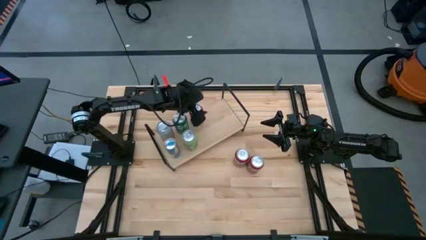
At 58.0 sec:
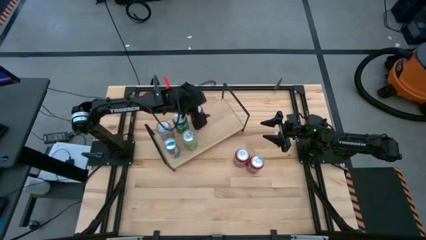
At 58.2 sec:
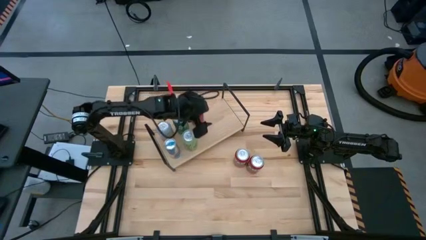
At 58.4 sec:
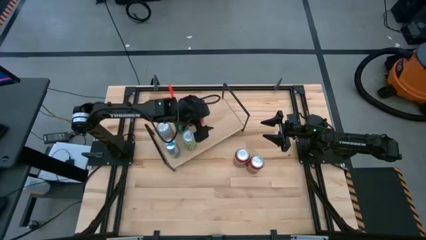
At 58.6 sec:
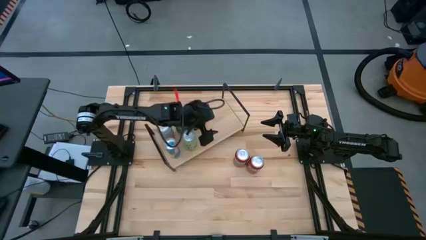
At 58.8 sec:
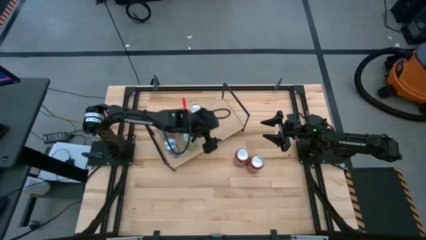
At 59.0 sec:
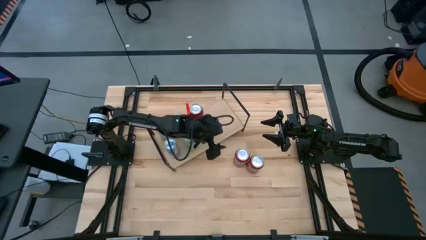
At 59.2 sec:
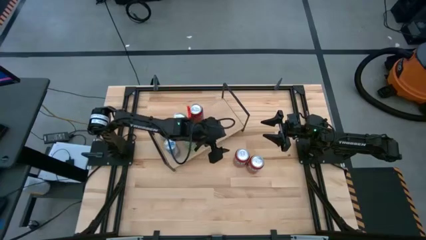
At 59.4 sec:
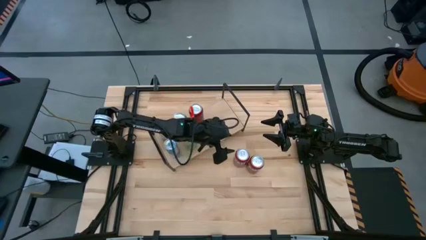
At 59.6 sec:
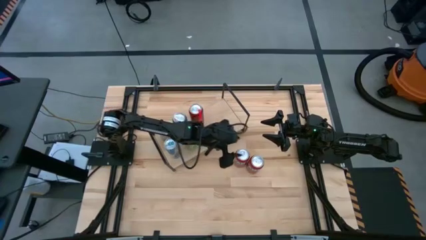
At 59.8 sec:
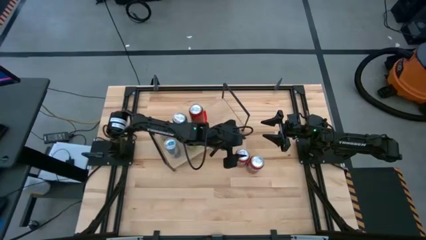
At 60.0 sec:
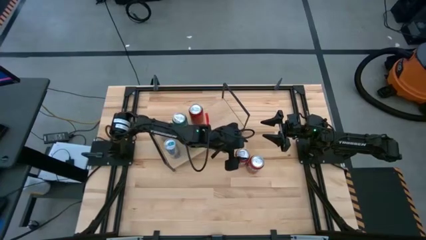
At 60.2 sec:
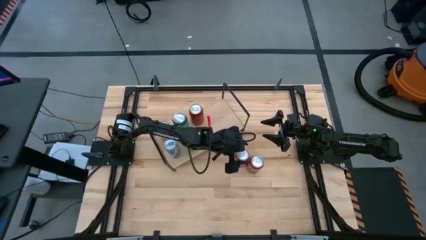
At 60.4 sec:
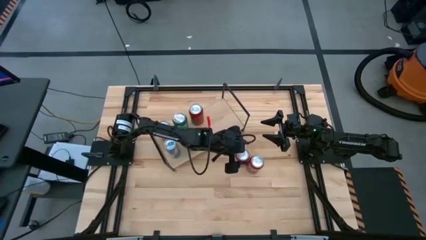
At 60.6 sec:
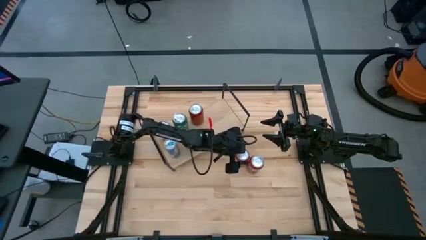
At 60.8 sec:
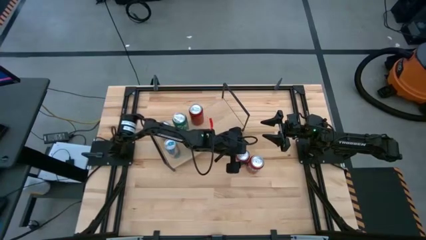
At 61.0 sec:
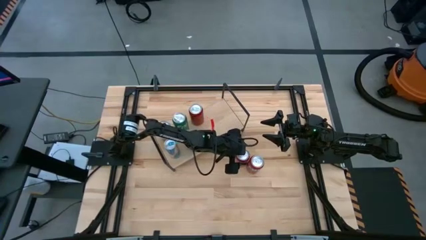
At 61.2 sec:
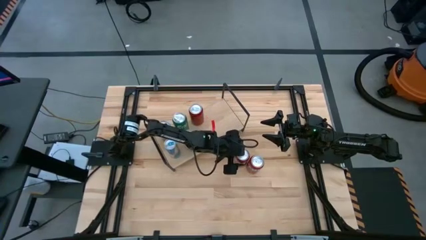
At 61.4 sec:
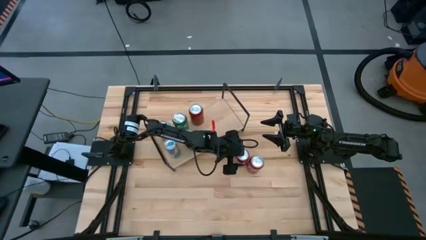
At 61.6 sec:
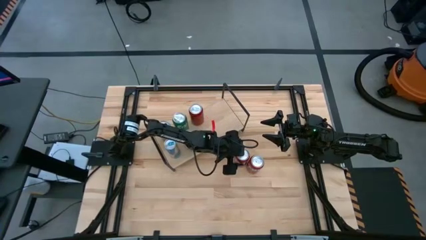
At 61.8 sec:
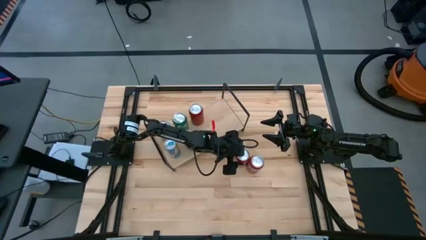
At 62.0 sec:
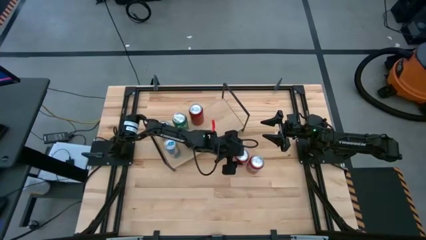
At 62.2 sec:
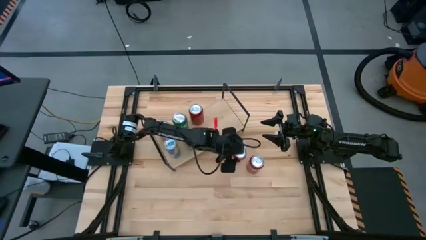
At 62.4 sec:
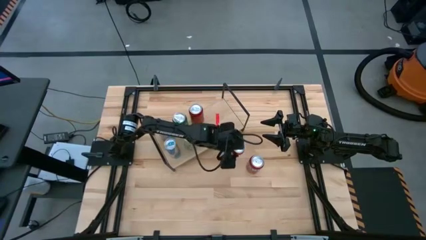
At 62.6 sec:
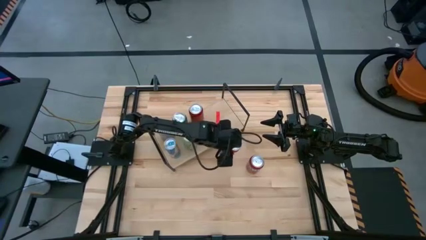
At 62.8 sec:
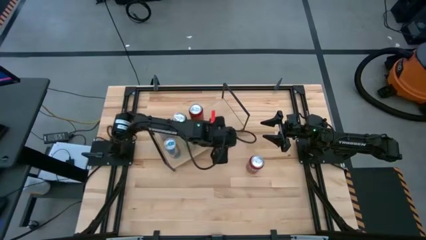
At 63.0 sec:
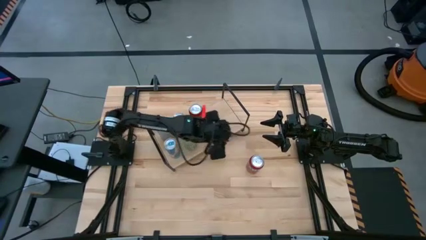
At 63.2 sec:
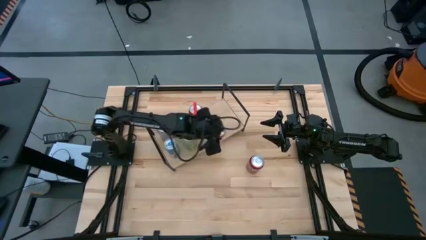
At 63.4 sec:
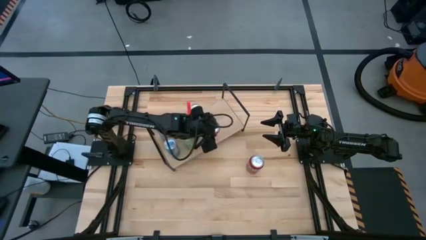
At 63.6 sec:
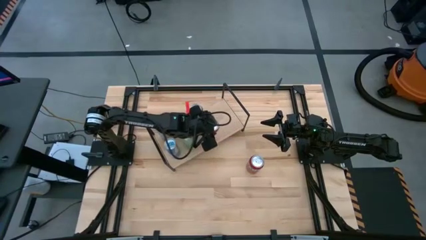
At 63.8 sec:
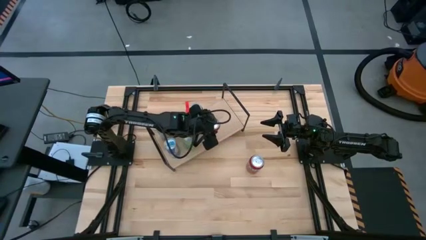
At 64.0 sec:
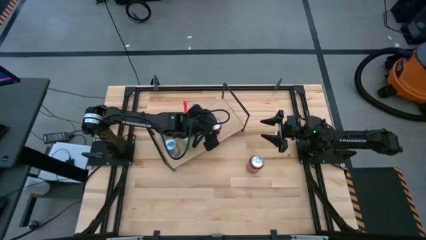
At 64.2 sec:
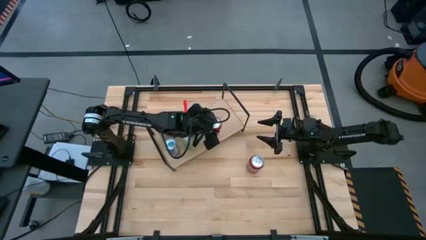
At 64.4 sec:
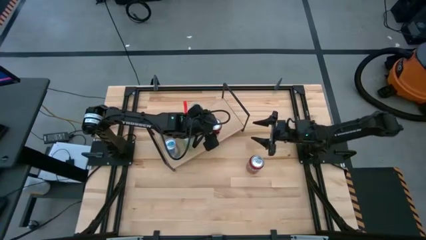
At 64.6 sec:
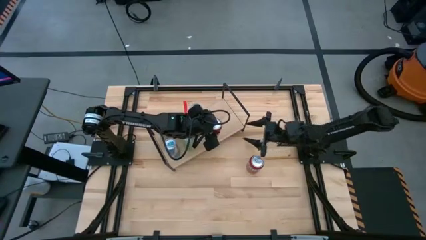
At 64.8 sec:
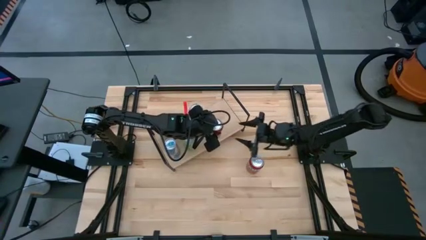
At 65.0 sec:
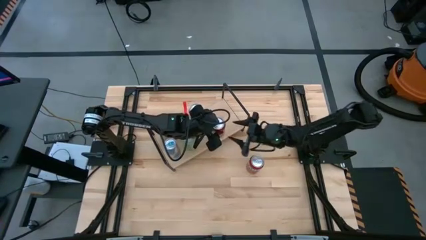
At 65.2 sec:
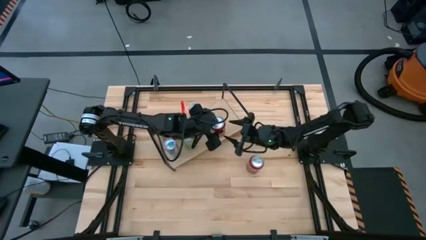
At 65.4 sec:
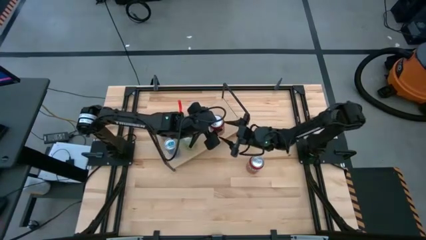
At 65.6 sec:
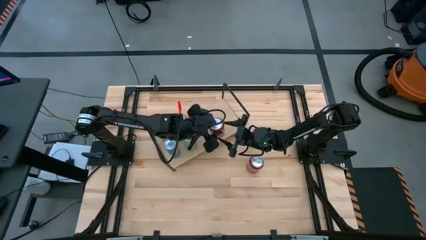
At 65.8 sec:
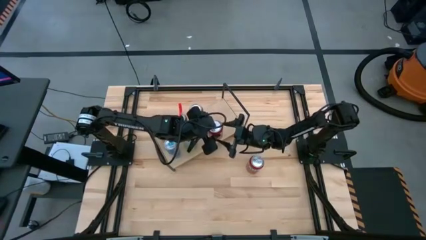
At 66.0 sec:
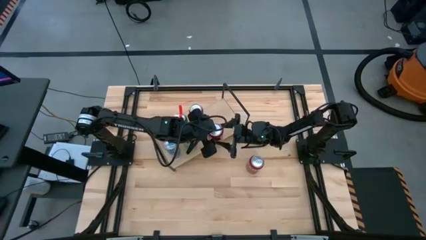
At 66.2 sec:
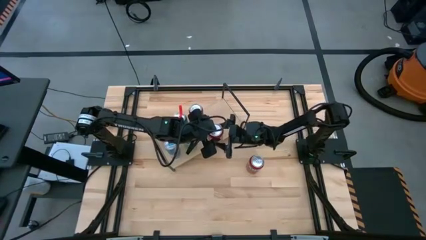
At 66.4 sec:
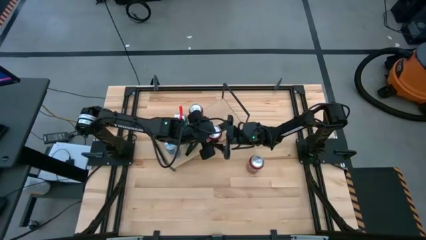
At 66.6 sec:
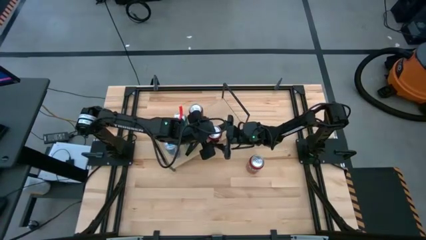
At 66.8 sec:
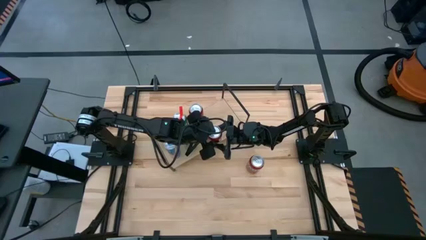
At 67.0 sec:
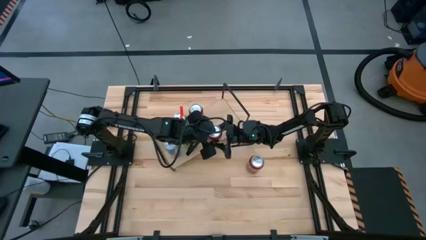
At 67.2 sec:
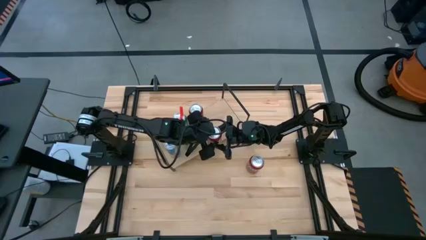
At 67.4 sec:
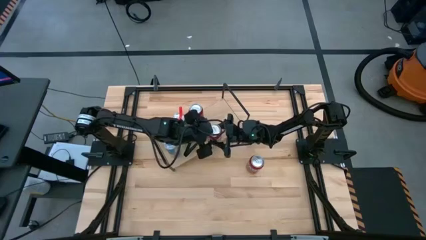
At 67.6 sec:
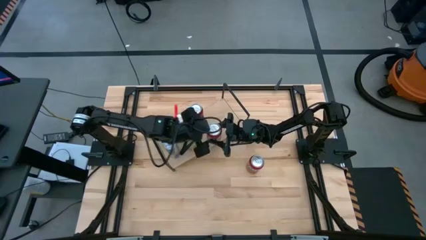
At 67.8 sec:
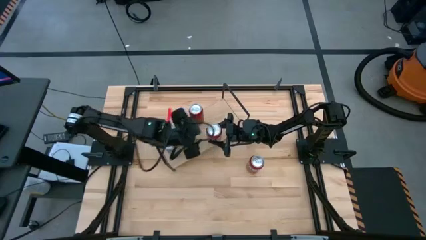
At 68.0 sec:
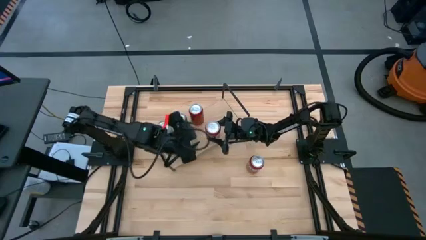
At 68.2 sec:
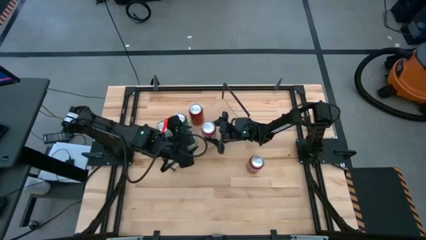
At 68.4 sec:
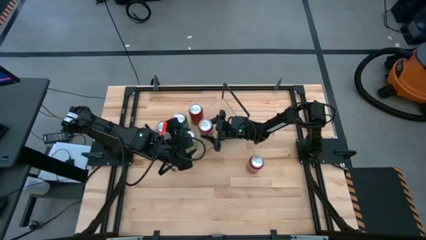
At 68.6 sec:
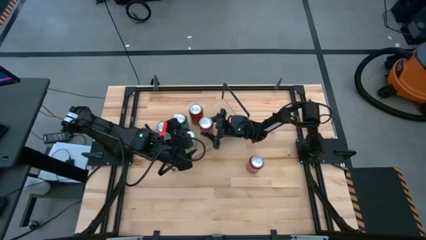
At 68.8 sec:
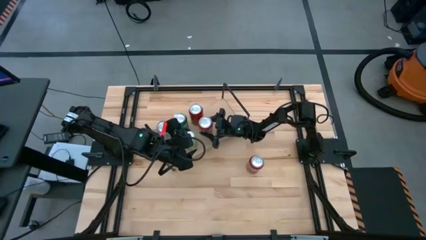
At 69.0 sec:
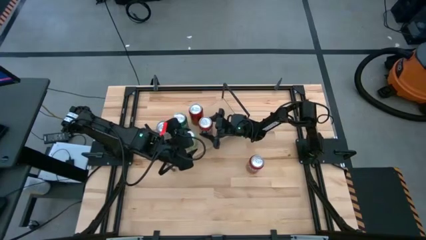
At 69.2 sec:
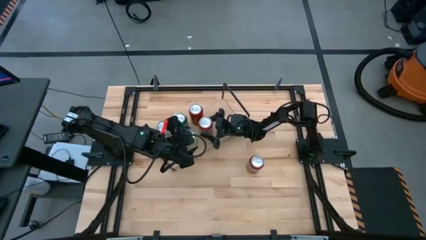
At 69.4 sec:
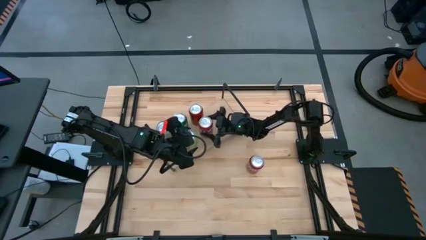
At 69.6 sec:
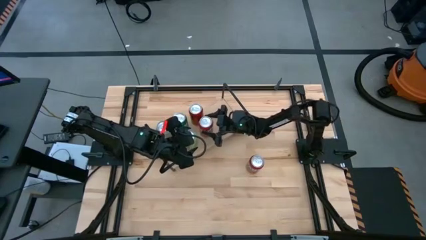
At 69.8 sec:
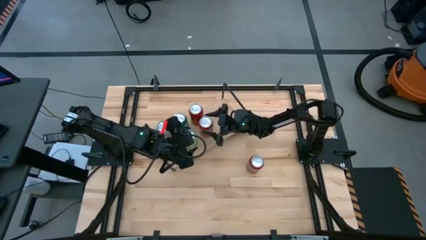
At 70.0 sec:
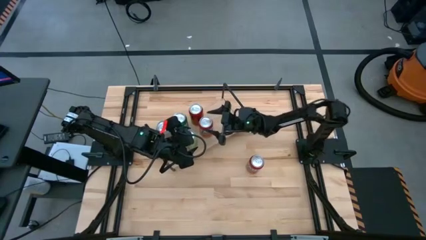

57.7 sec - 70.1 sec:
Task: Place canned beverage on shelf
Put the orange soda can onto the shelf

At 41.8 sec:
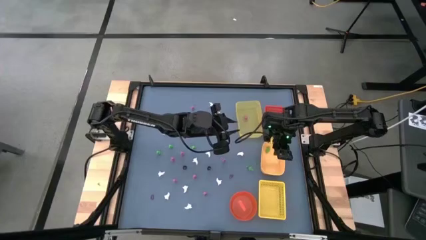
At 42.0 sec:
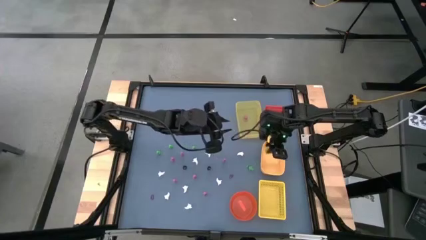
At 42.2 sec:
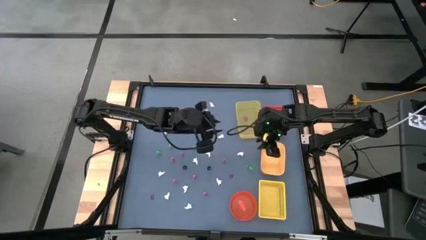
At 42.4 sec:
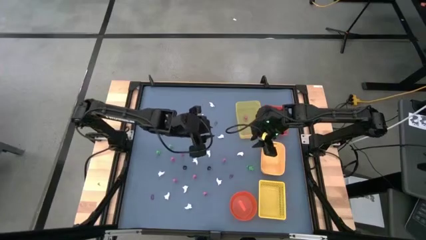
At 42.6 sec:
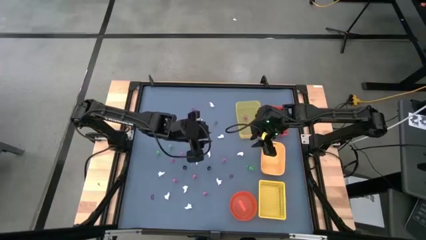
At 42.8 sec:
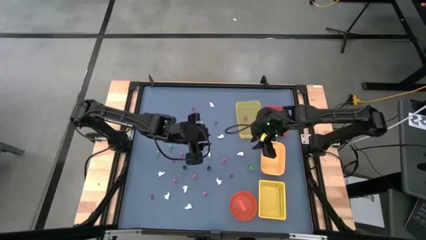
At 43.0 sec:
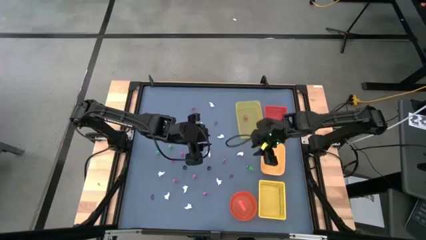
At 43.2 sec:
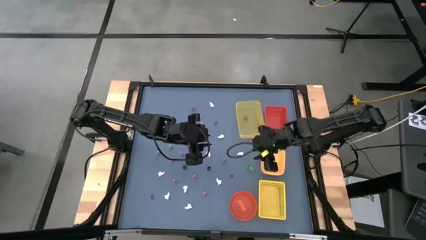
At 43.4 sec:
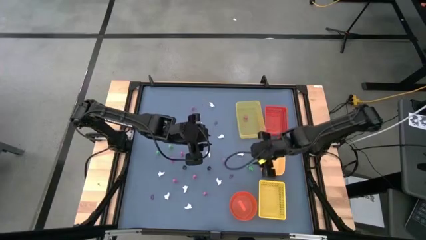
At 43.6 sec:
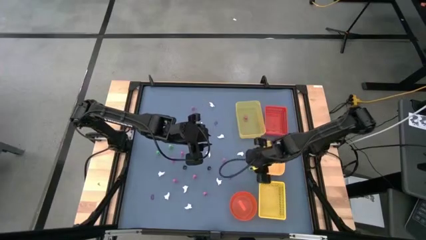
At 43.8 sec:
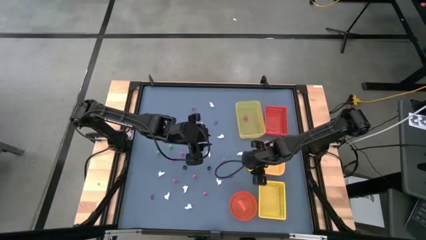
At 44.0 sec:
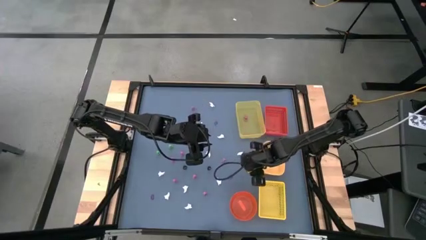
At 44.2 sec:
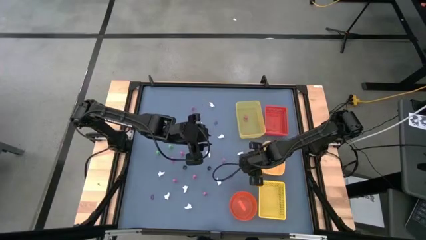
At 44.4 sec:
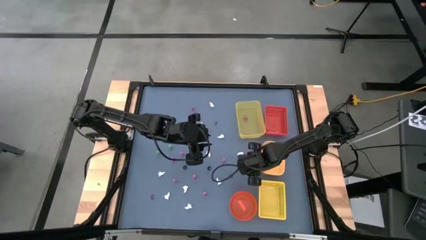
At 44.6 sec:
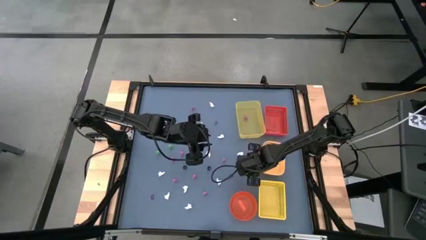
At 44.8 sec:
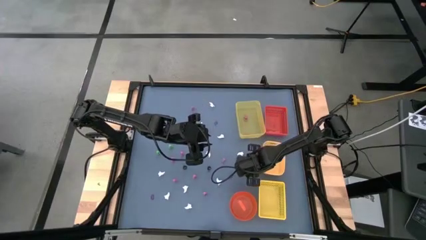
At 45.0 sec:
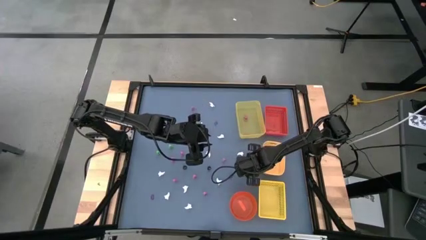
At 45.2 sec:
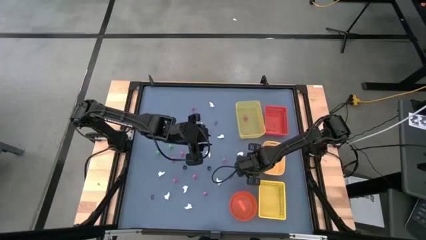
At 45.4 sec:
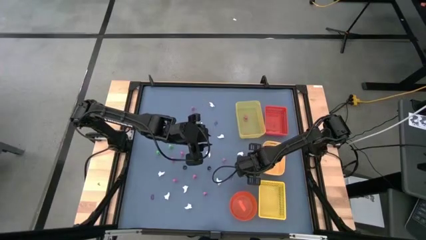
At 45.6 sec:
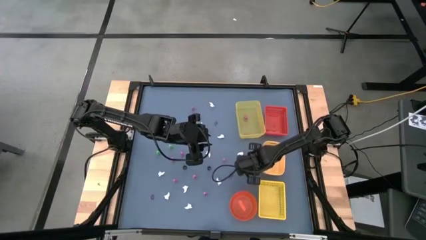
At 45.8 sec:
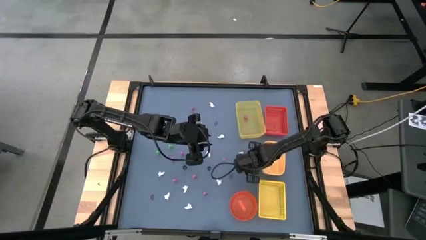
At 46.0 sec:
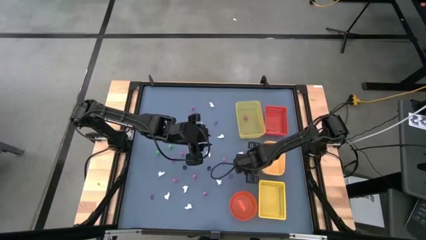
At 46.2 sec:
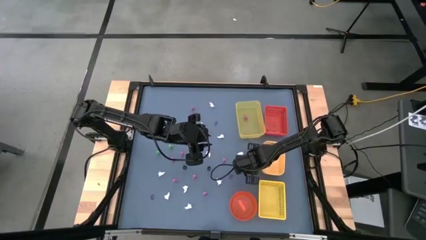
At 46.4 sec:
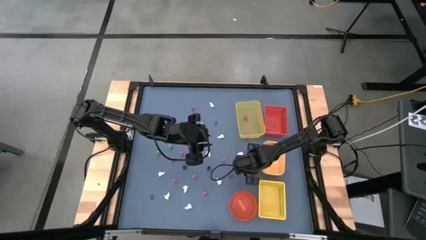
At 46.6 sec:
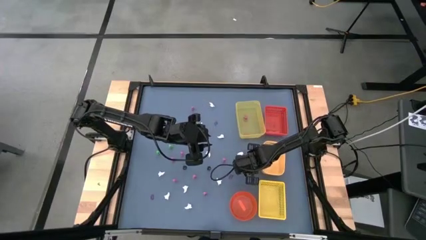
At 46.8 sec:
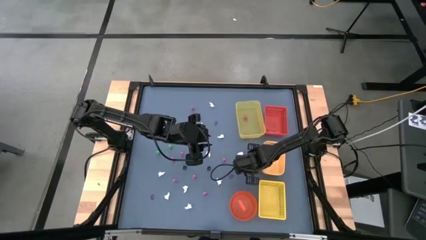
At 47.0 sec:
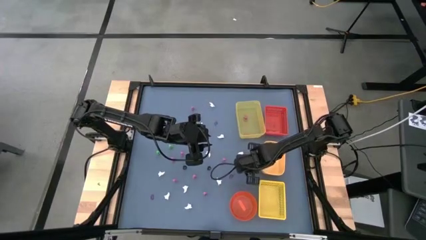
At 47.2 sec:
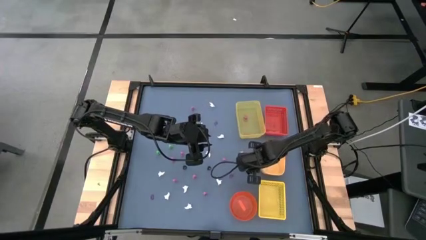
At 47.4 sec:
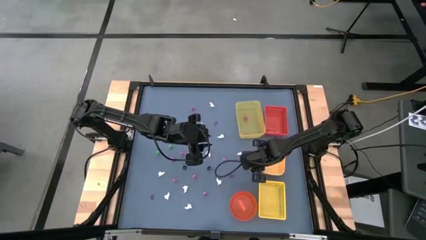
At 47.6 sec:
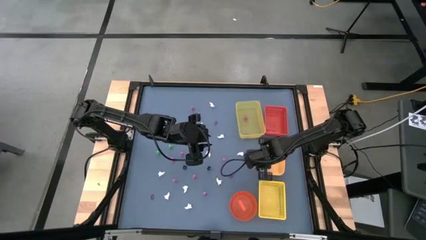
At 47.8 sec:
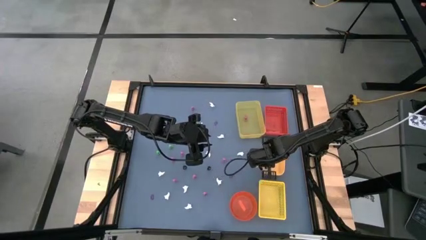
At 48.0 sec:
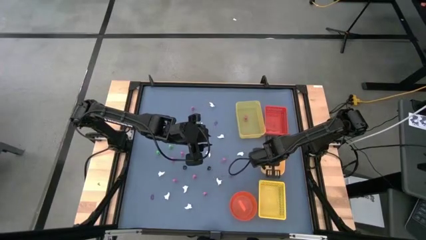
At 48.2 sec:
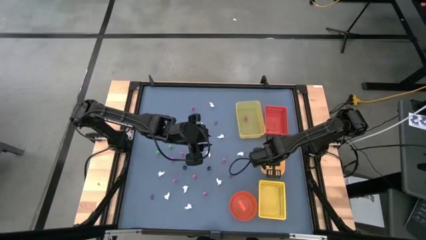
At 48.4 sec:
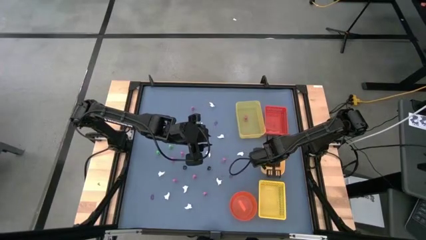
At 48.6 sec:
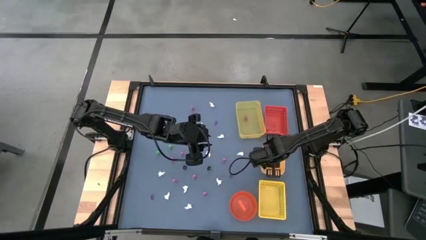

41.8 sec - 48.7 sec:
Task: Sort Halloween decoration
Put the green skeleton toy into the middle yellow bin
